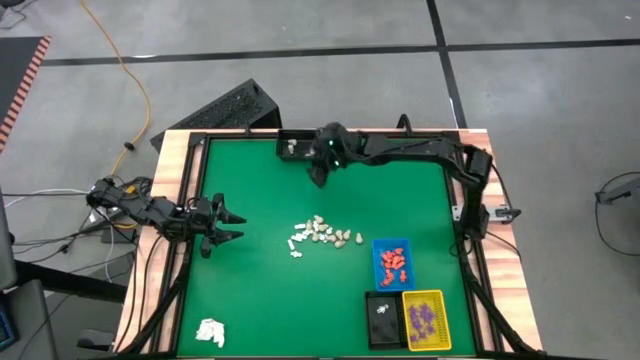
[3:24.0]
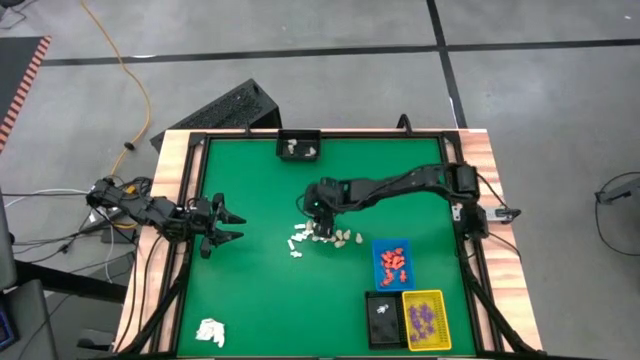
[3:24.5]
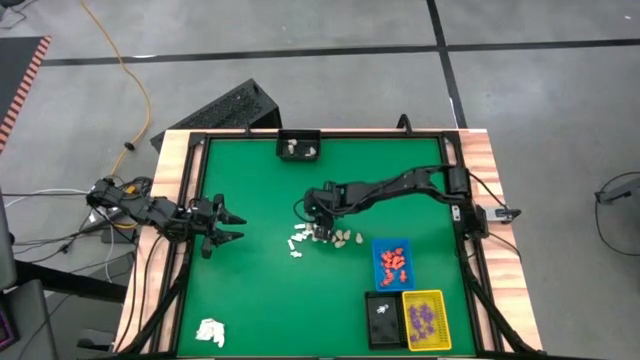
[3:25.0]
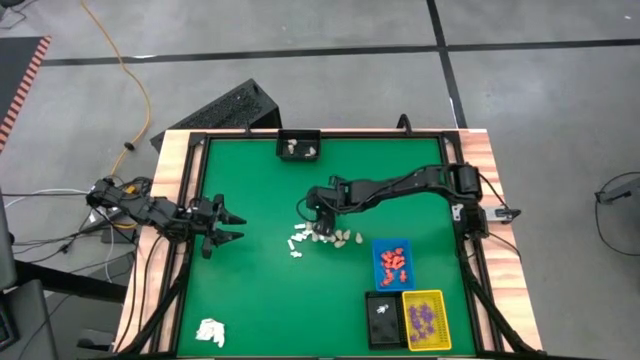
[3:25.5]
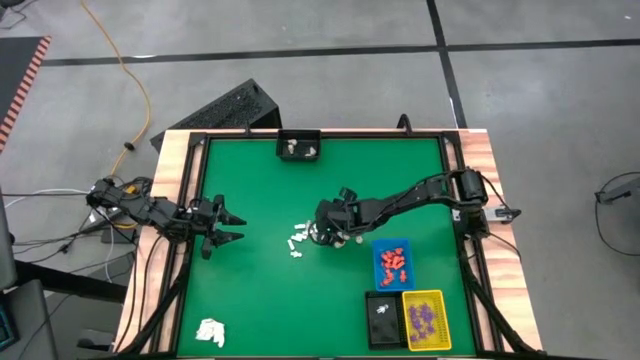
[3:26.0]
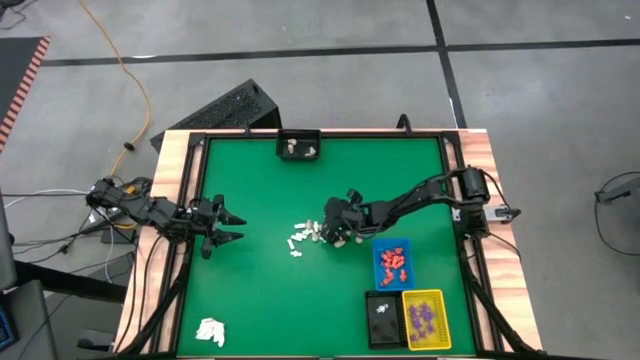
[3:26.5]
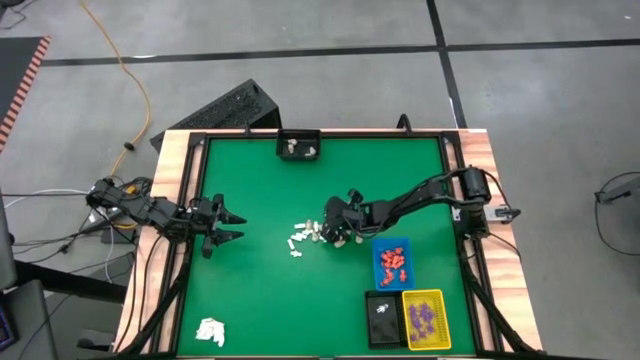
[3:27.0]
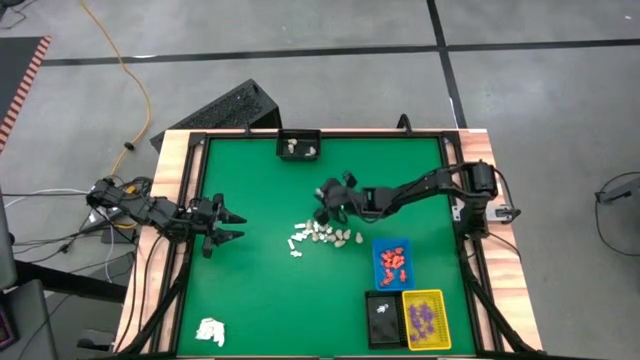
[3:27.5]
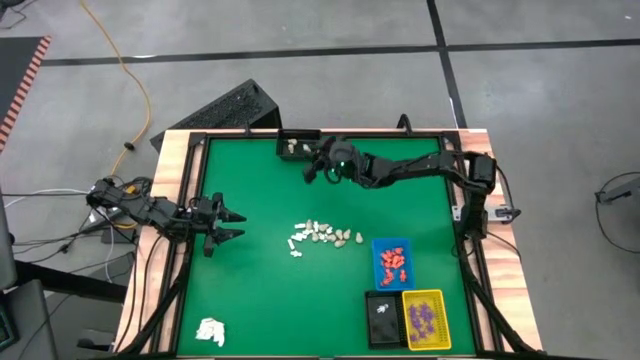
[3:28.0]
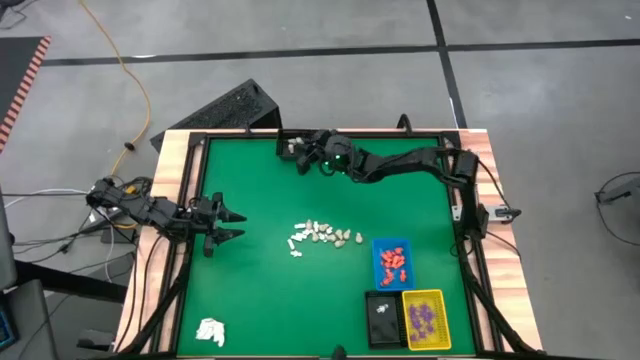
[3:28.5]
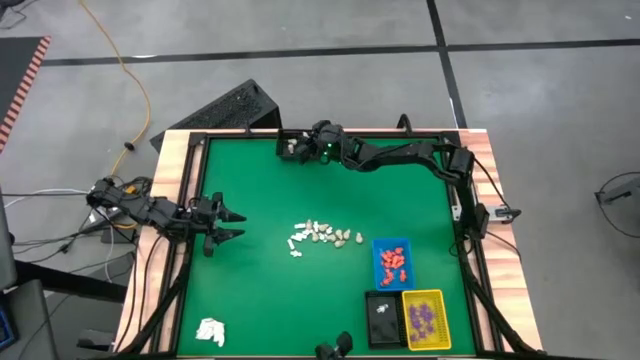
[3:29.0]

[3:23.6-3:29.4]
Task: Sort Halloween decoration
Put the gray skull toy into the top black bin

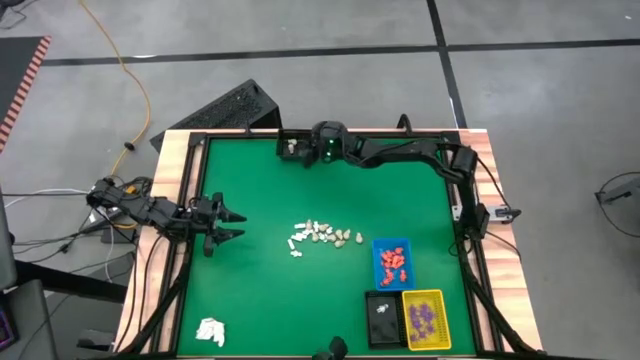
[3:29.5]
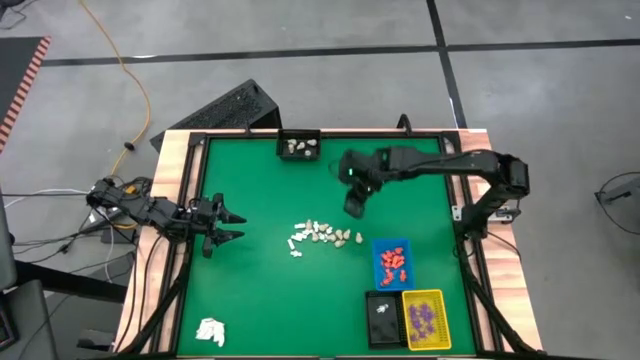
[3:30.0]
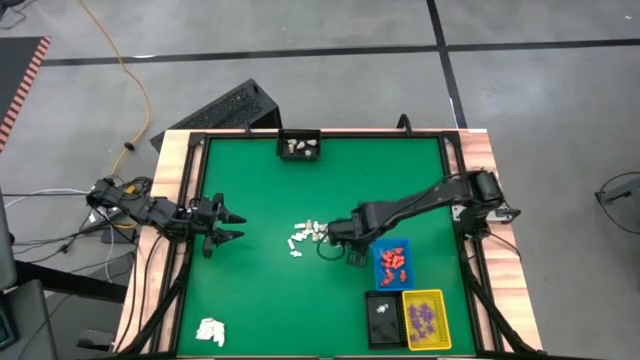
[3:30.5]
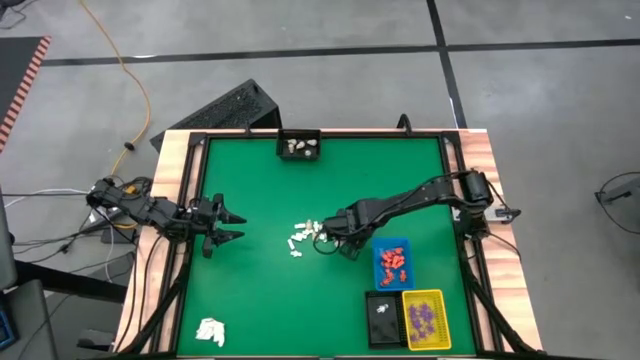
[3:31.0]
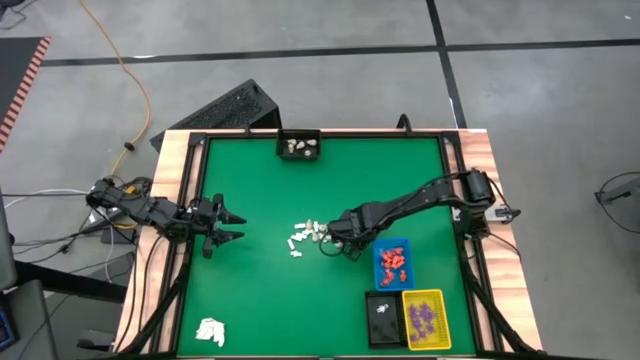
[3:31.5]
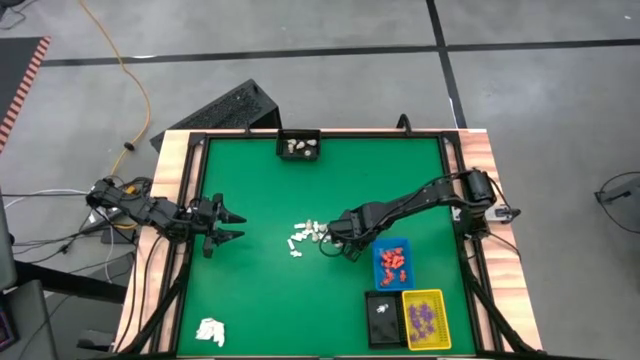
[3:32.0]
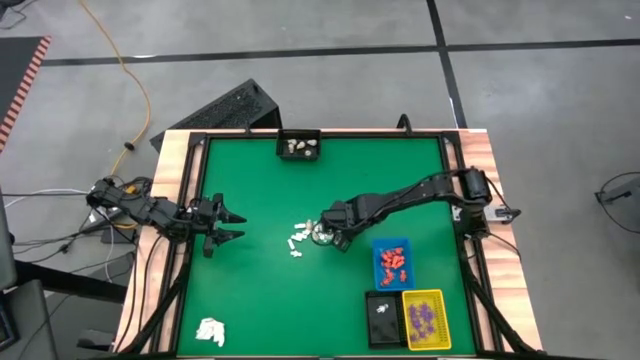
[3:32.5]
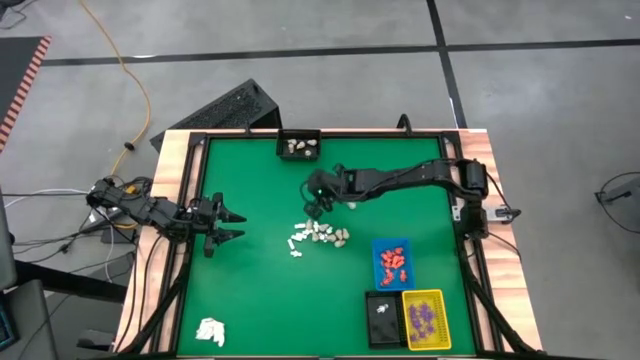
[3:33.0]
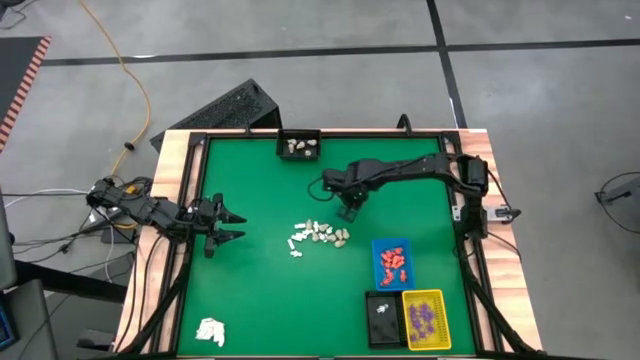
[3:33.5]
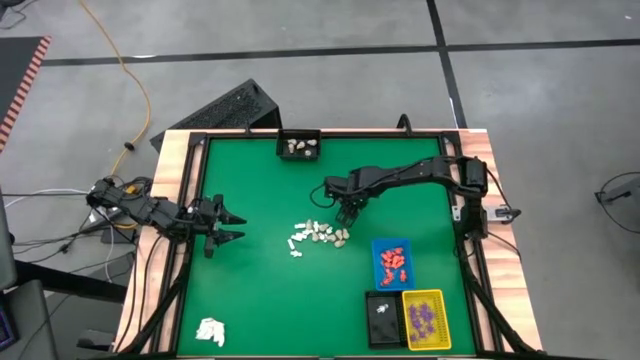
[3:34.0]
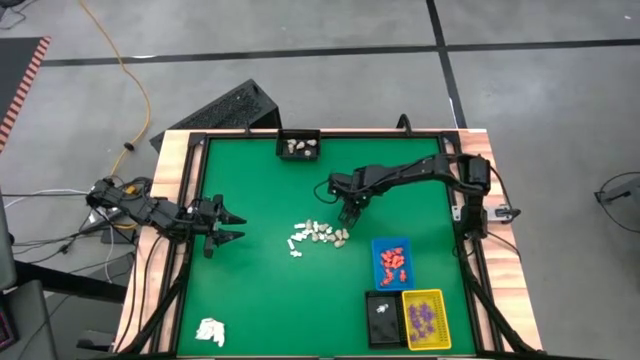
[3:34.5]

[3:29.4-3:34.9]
Put the gray skull toy into the top black bin

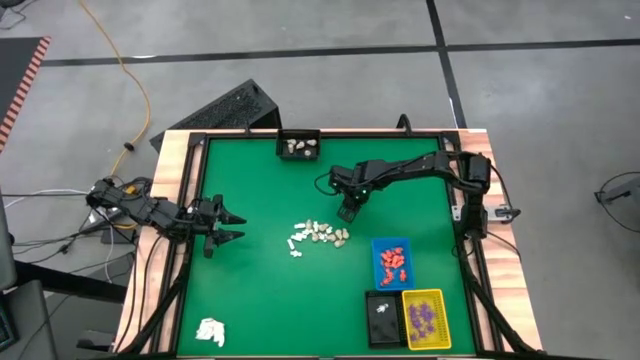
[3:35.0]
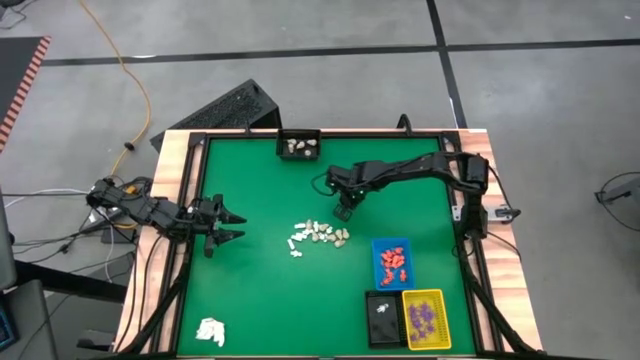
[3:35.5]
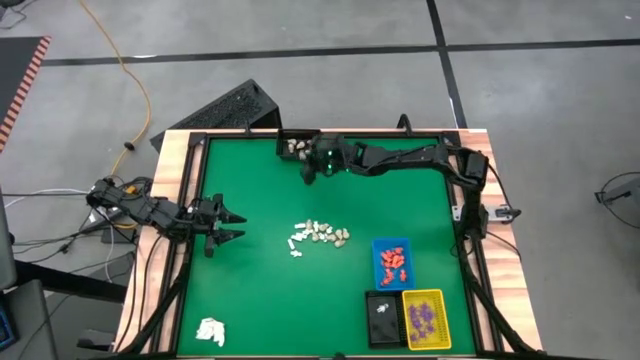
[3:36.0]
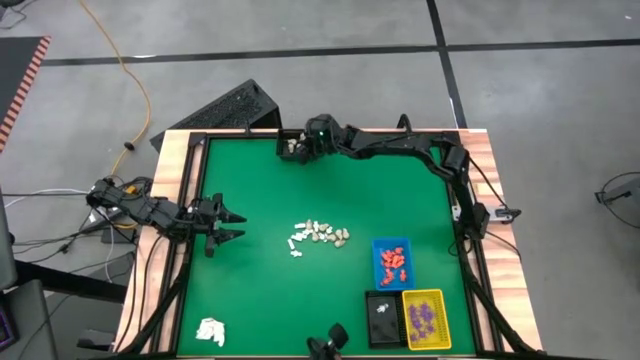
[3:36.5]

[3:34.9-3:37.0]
Put the gray skull toy into the top black bin

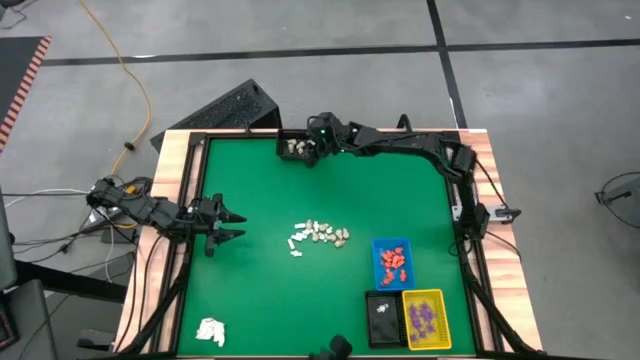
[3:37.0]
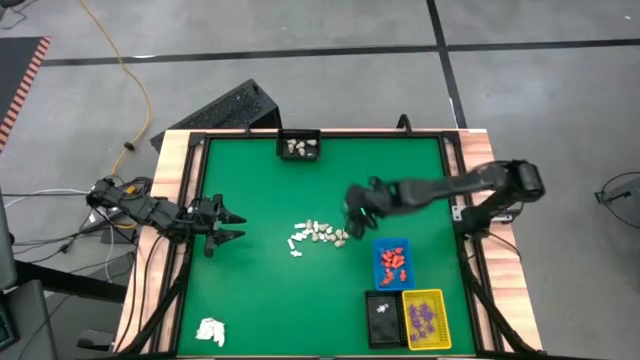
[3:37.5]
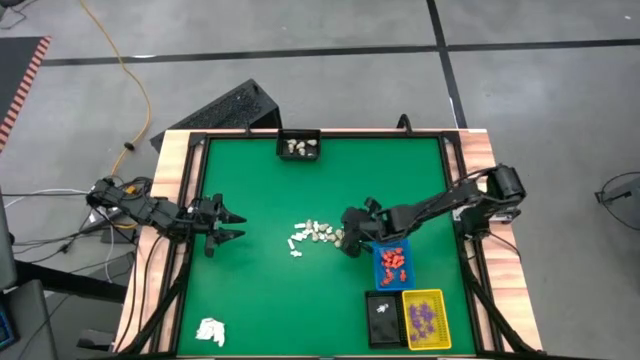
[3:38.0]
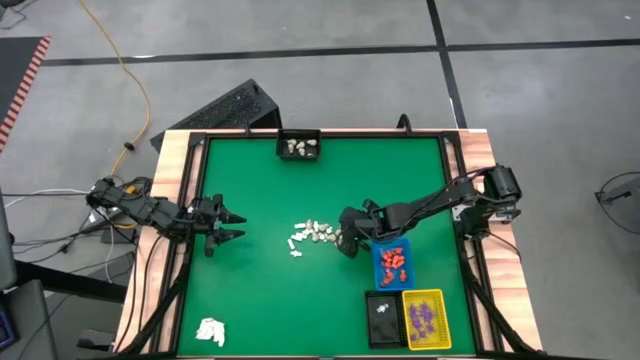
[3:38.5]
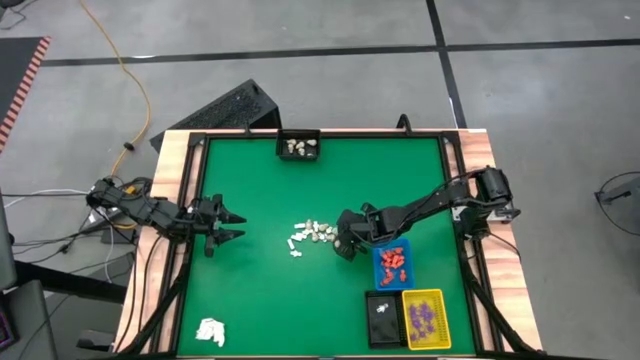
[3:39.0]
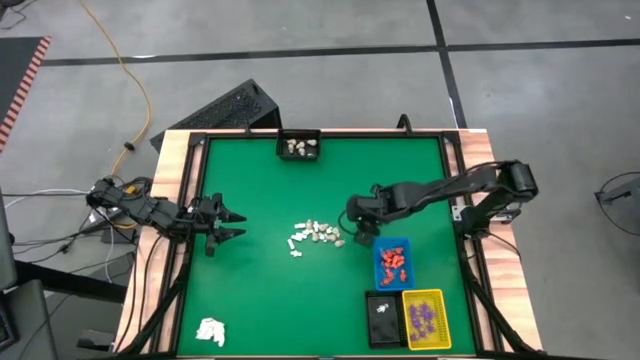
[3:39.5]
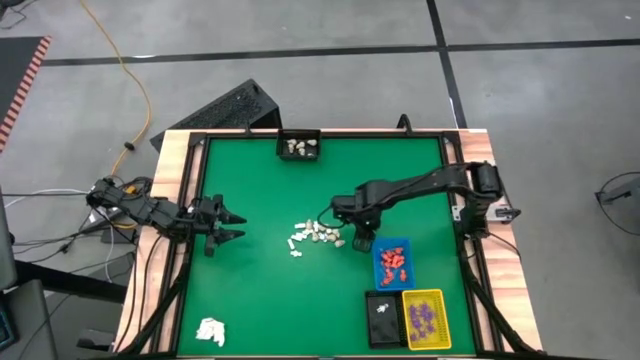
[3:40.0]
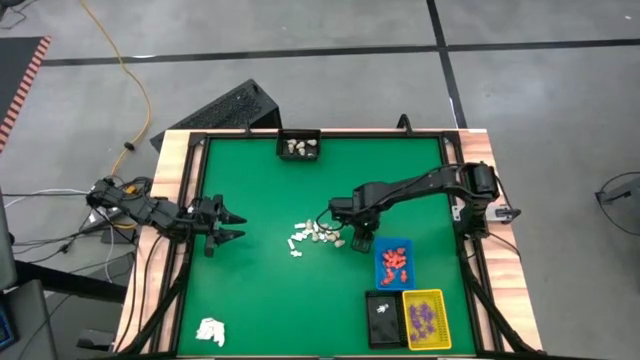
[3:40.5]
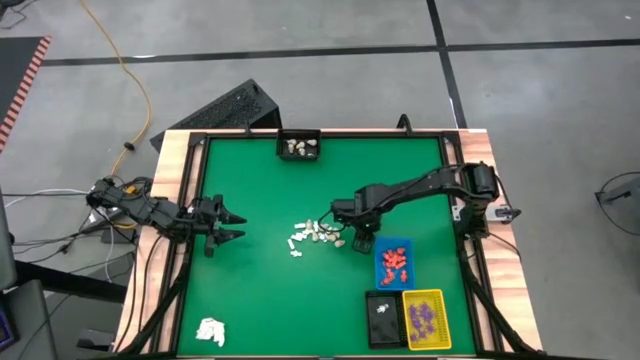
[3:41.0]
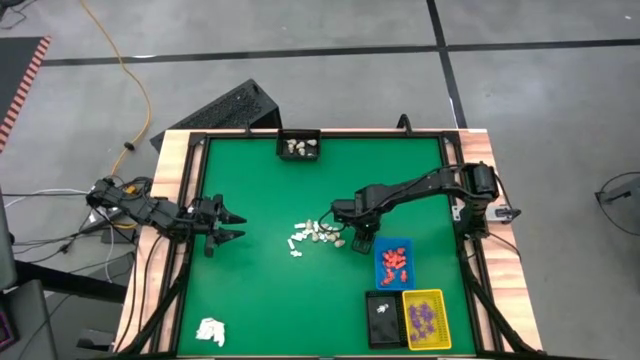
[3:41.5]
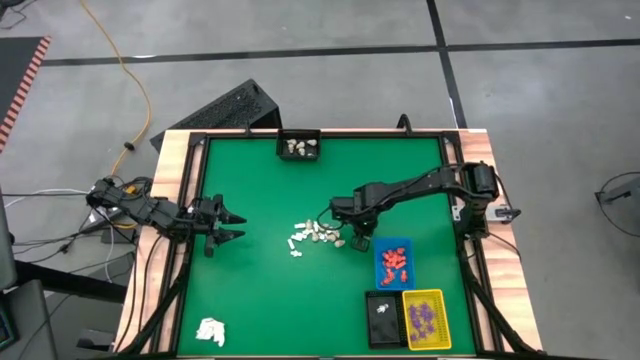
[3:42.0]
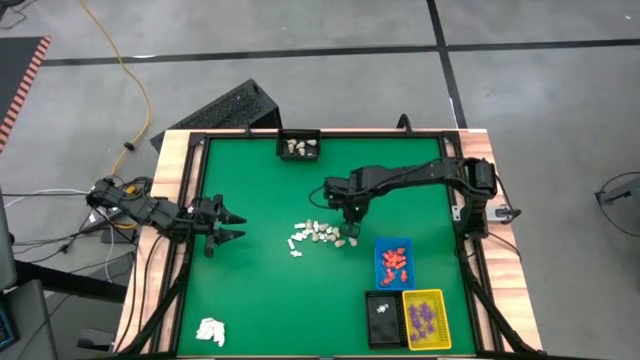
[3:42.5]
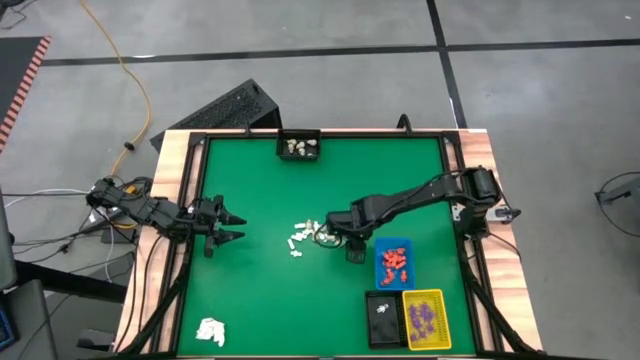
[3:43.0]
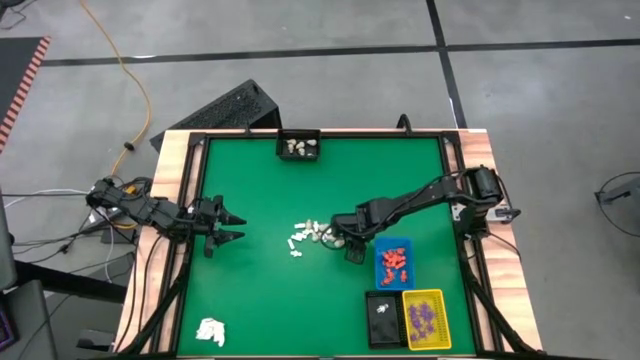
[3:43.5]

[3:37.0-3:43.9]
Put the gray skull toy into the top black bin

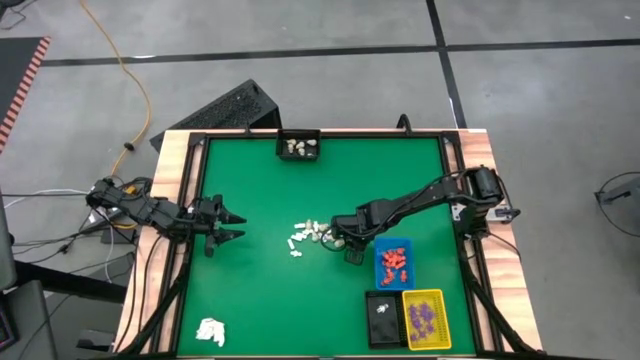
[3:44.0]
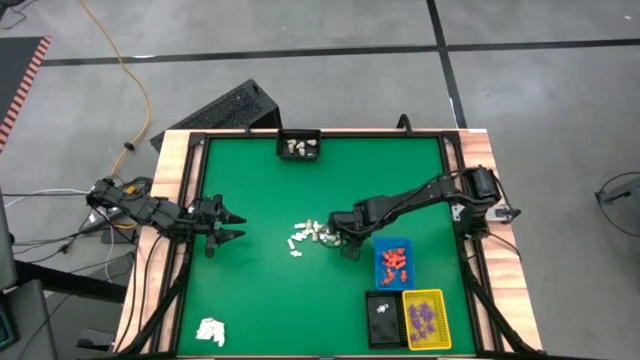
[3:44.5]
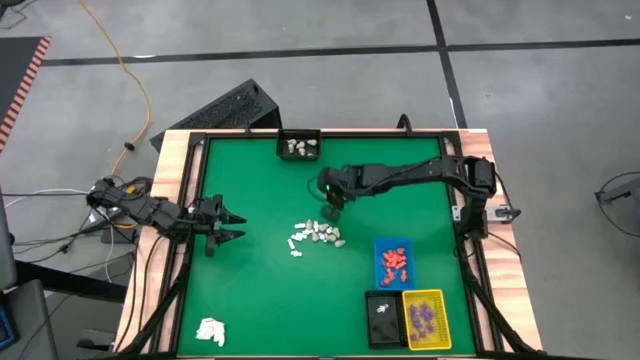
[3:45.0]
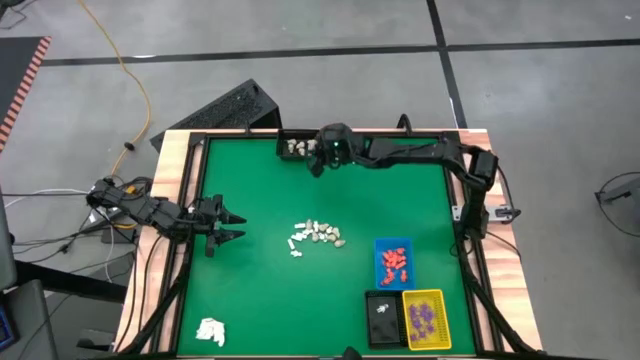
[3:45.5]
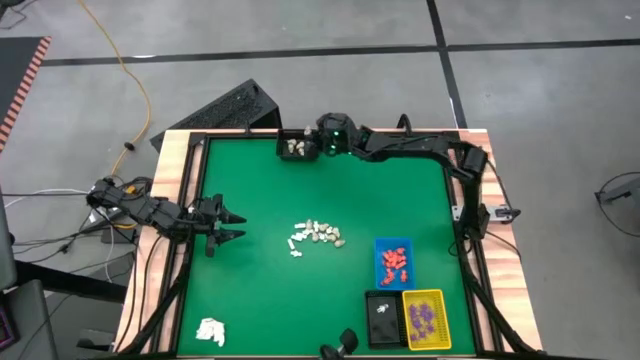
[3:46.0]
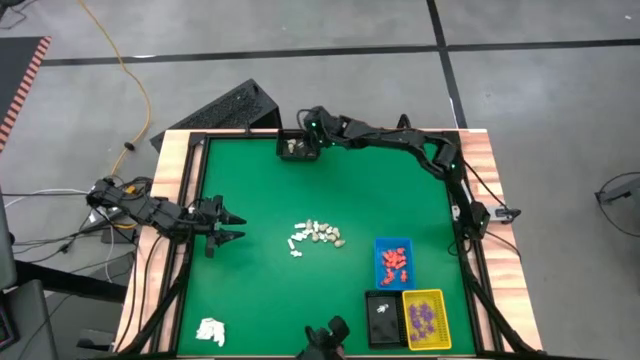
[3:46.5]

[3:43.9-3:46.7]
Put the gray skull toy into the top black bin
